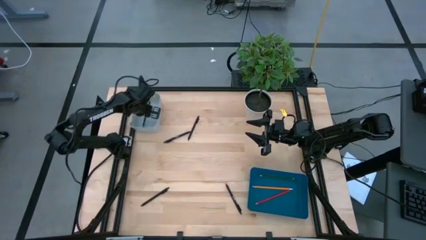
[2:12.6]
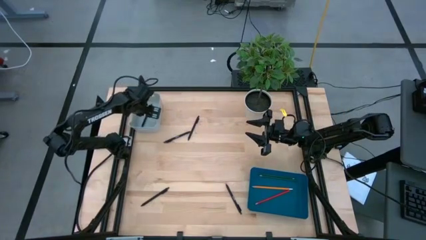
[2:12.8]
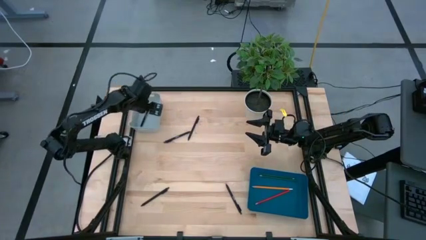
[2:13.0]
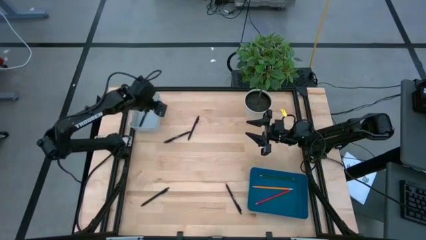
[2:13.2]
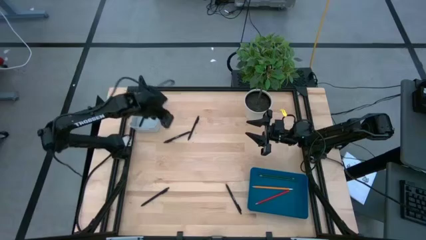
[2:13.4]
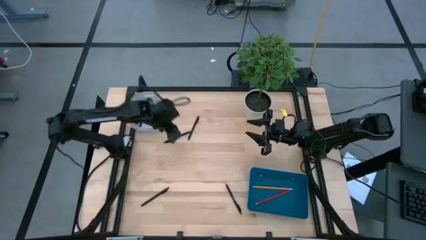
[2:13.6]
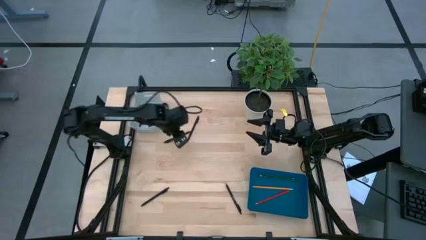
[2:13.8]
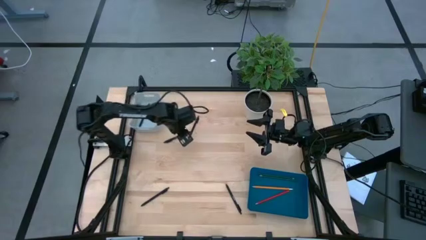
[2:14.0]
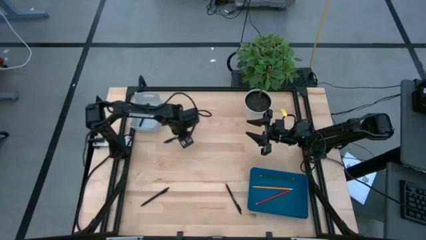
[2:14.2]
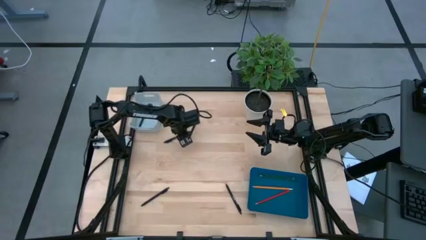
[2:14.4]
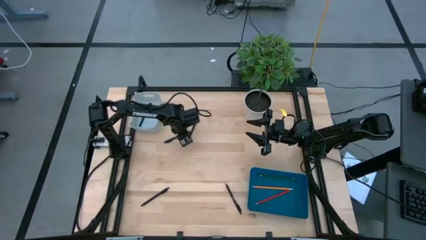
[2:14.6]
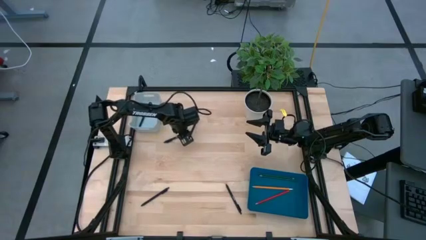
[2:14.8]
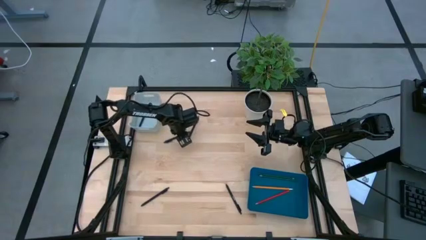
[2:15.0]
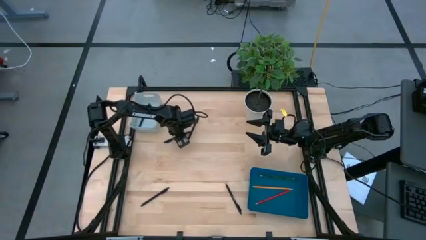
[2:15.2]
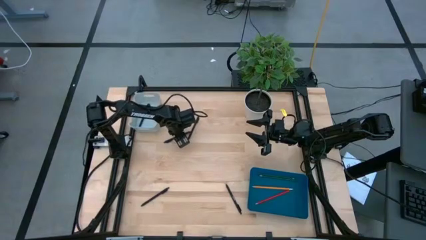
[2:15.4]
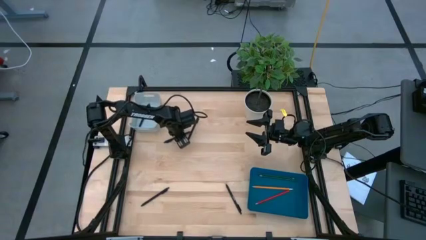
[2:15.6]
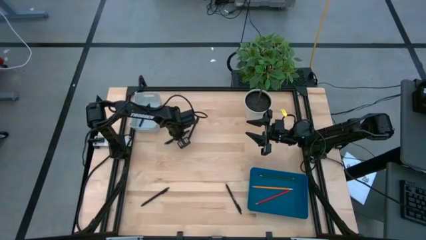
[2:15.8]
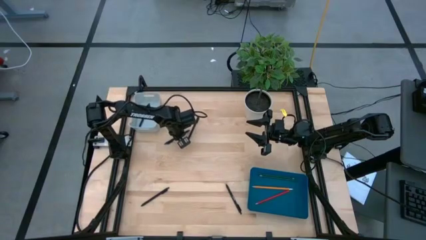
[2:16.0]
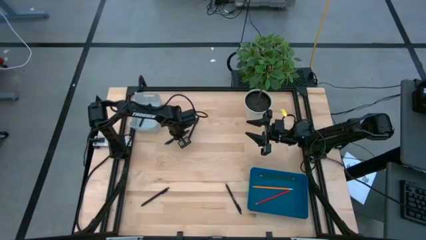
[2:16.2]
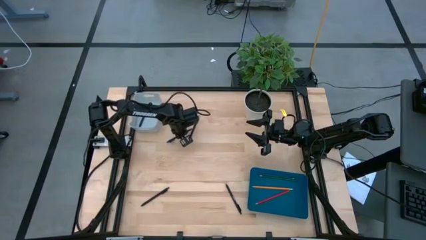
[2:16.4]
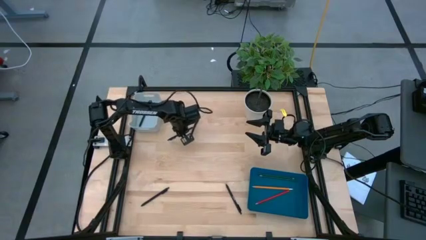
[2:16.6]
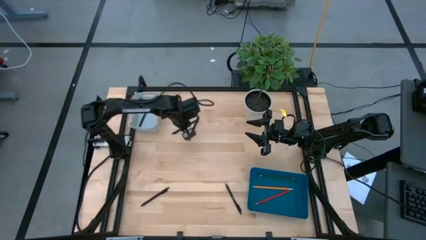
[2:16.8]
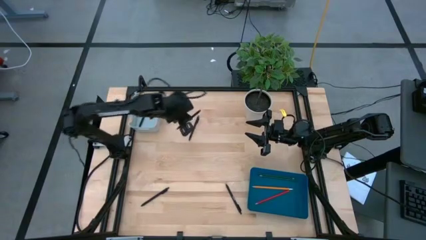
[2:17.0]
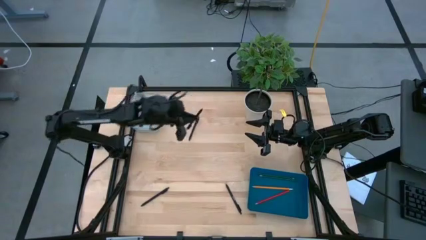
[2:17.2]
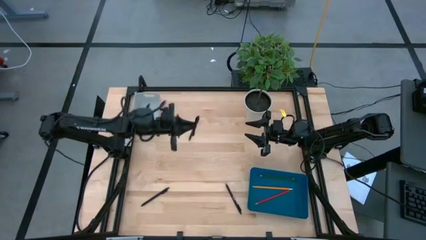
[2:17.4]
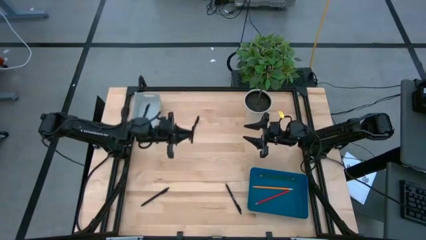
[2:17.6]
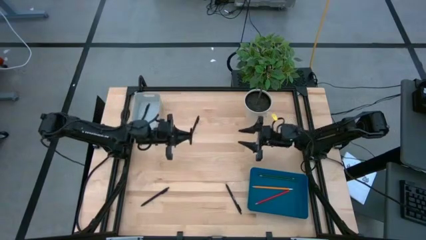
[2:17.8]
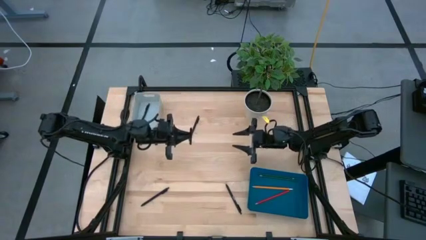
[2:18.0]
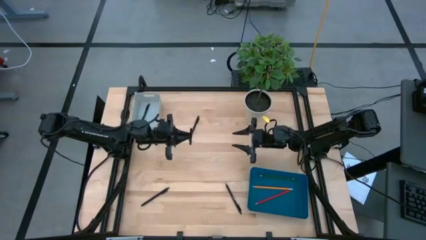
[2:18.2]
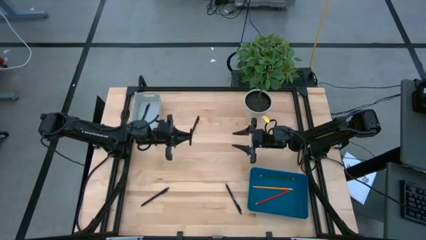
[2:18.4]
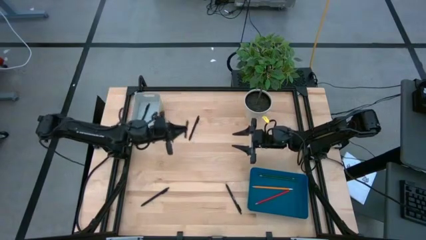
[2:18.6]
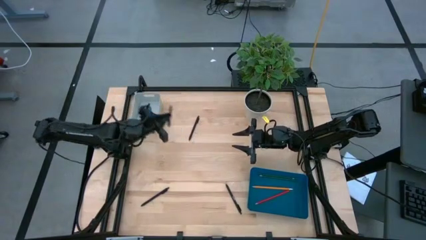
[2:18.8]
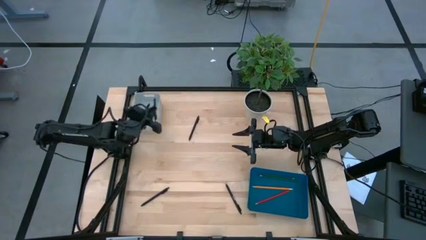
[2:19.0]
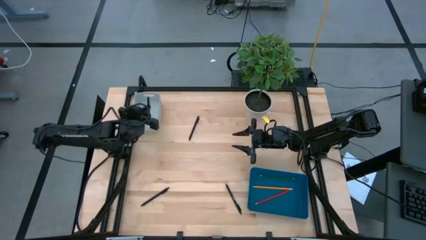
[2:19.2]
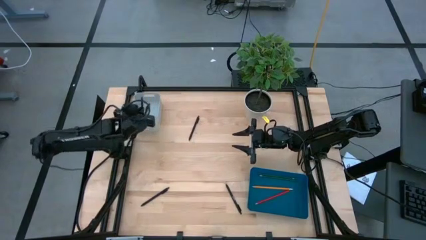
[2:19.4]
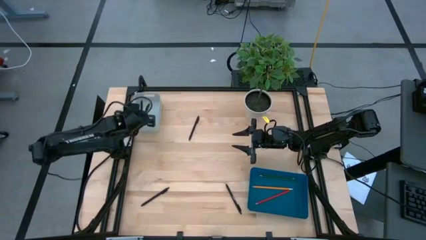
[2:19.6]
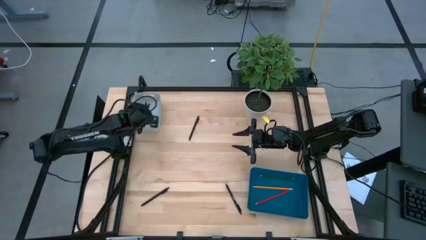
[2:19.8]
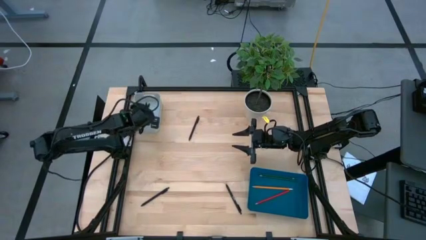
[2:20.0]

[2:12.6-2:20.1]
Task: Sort pens & pencils
Put the black pen into the white bin

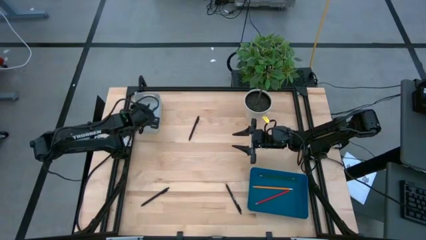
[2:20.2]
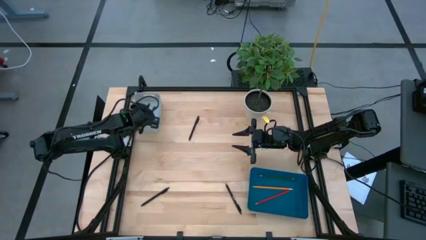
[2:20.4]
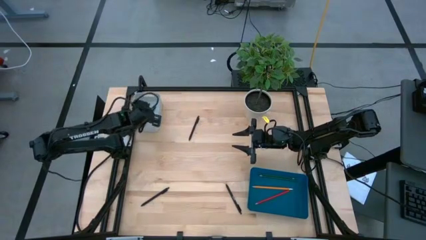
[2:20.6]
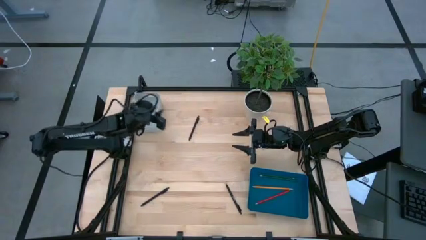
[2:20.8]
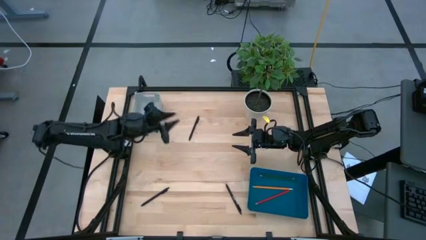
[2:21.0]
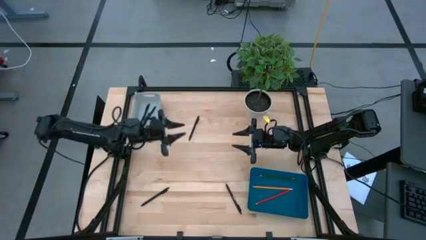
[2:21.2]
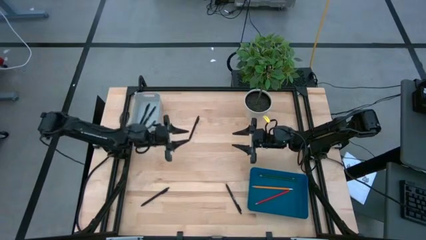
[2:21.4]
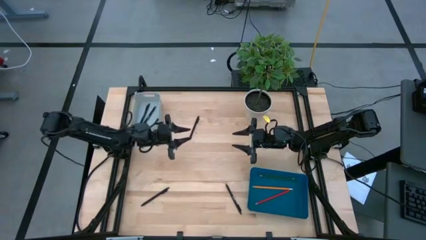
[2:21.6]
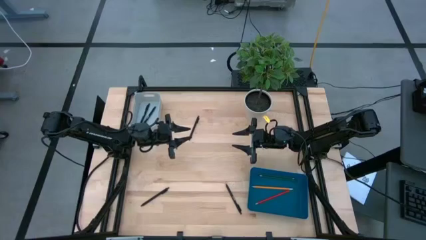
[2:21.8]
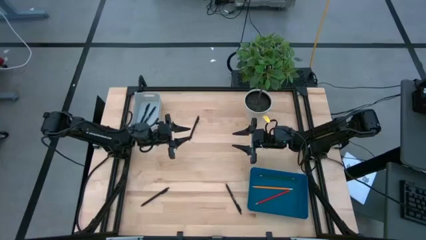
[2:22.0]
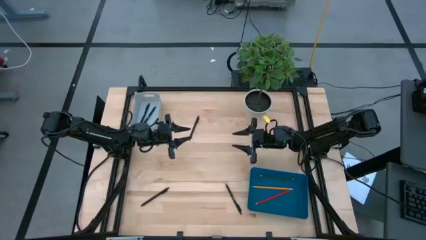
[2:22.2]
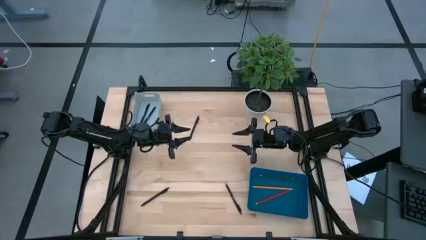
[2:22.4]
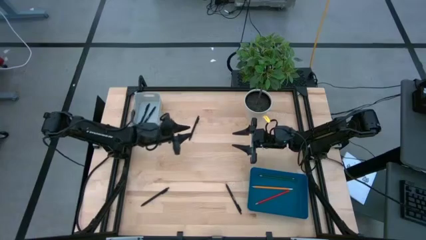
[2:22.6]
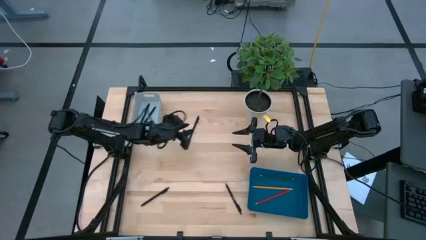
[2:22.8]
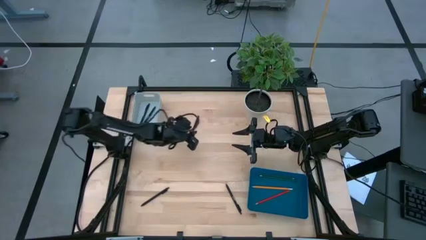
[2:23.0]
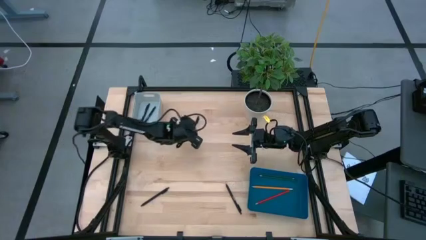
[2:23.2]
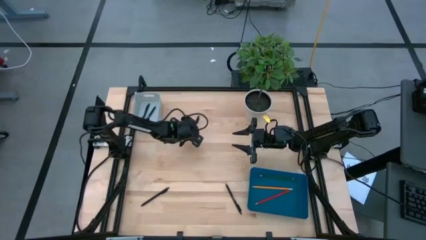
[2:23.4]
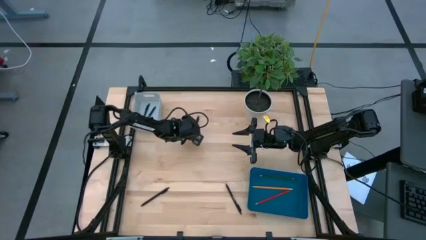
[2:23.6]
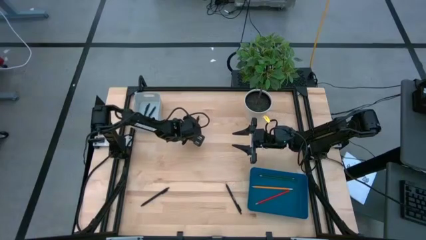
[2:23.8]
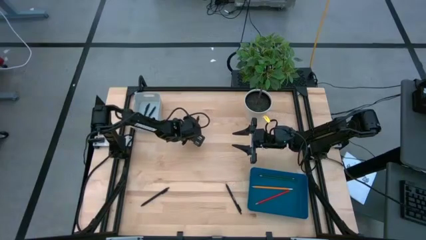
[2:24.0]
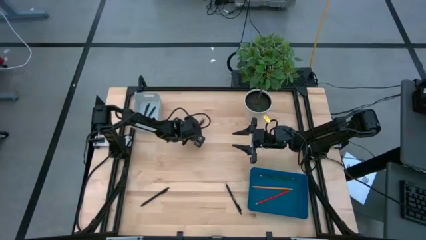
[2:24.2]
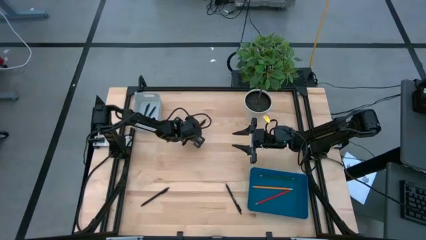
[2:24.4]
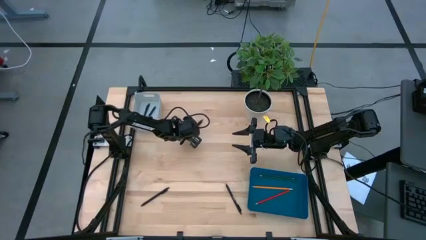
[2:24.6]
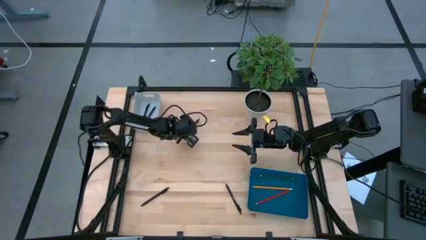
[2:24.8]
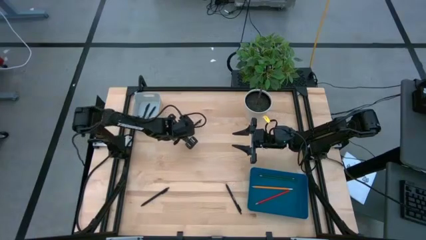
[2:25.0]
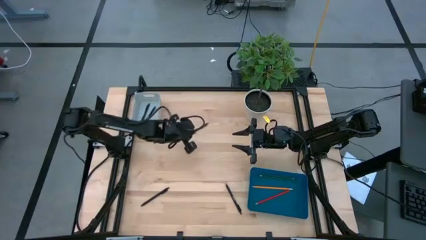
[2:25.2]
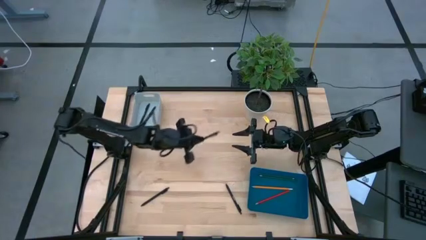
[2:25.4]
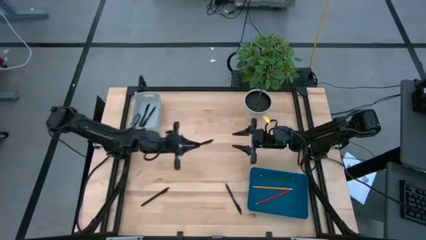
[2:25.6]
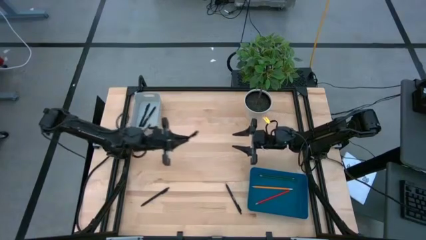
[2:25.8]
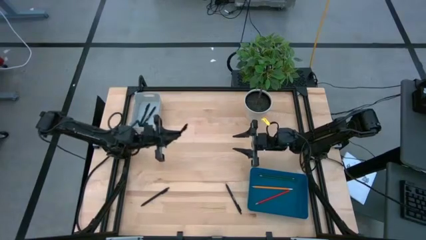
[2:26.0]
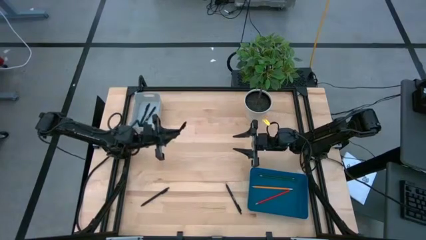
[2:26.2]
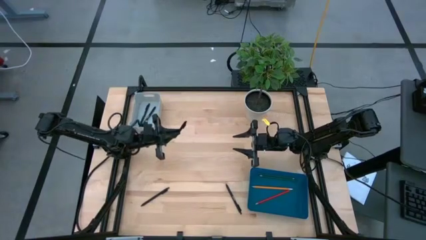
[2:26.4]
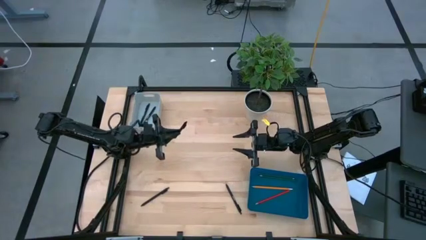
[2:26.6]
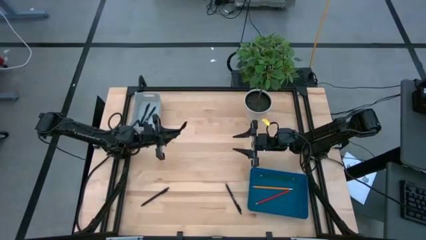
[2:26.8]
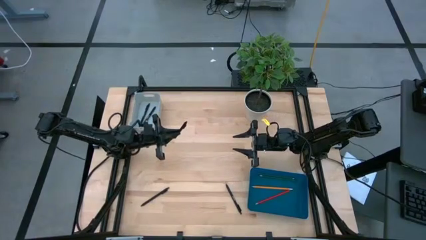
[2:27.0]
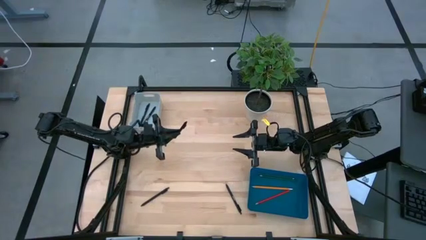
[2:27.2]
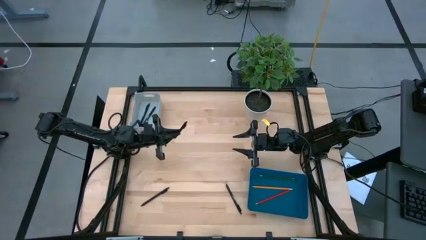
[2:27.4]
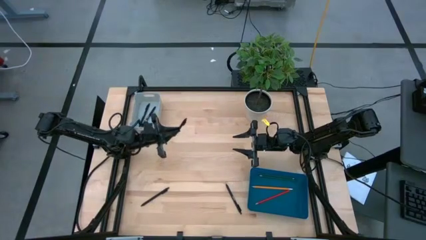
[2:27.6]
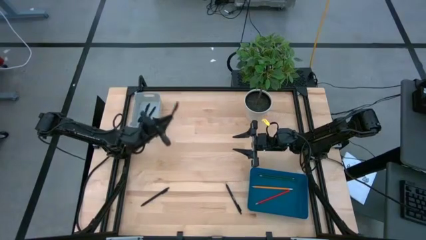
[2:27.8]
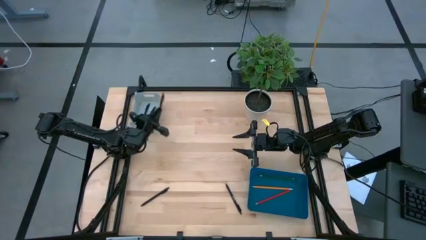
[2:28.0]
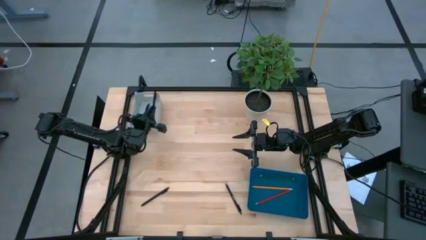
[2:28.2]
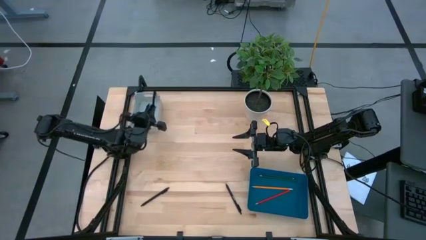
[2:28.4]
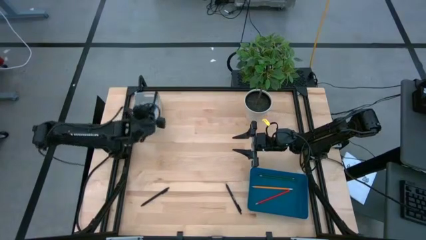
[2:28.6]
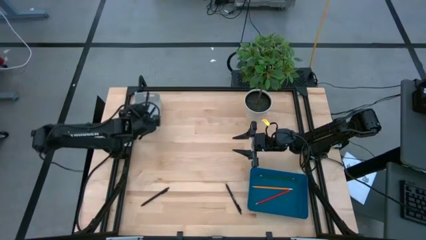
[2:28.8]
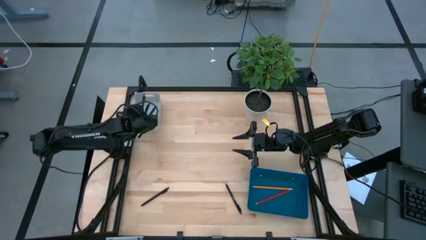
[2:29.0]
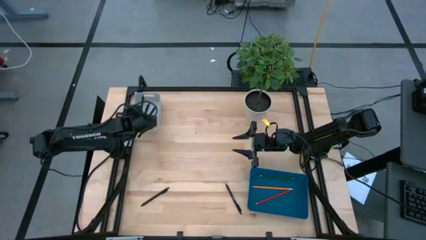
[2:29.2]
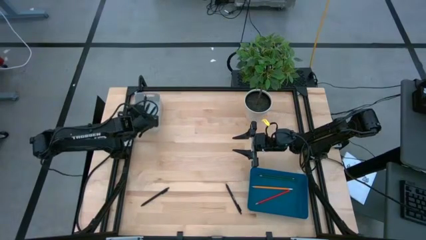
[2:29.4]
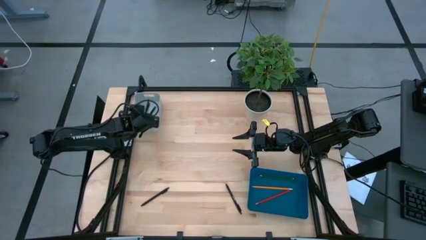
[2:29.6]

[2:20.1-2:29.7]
Put the black pen into the white bin
